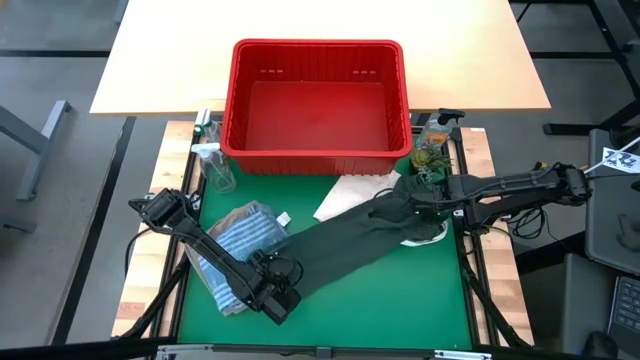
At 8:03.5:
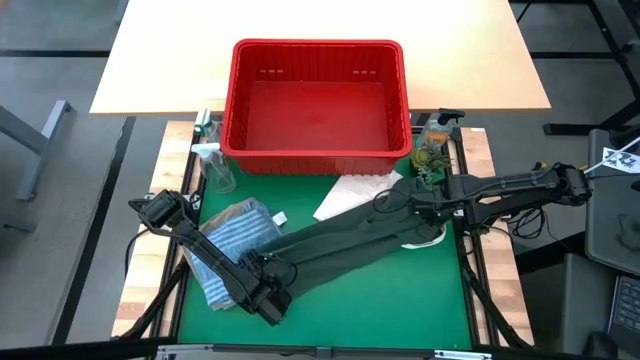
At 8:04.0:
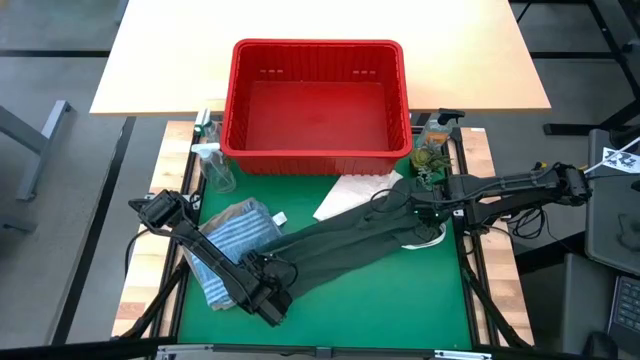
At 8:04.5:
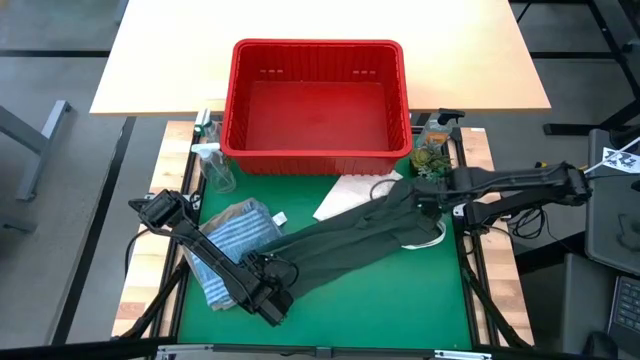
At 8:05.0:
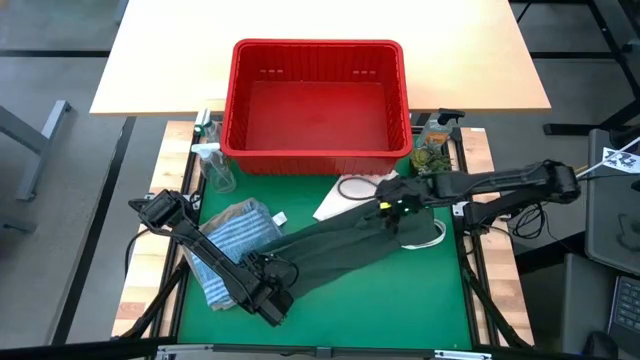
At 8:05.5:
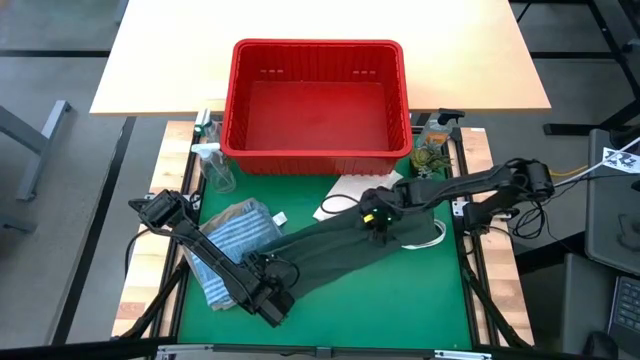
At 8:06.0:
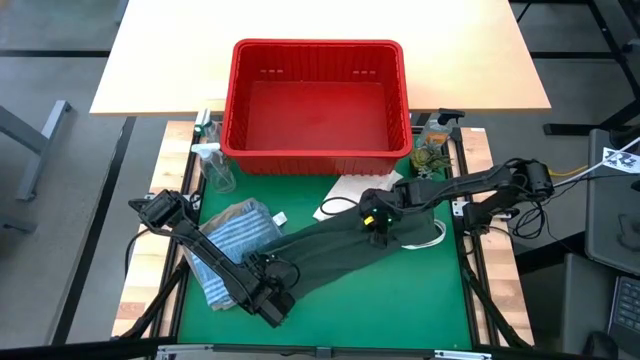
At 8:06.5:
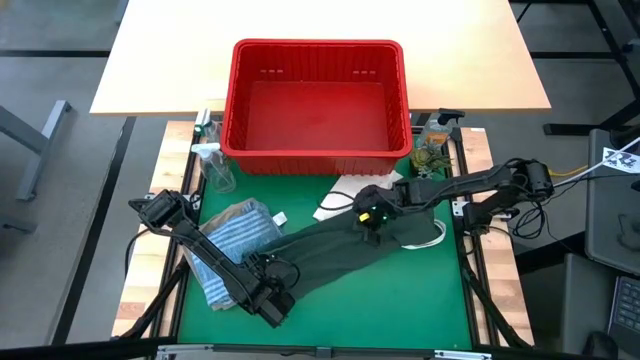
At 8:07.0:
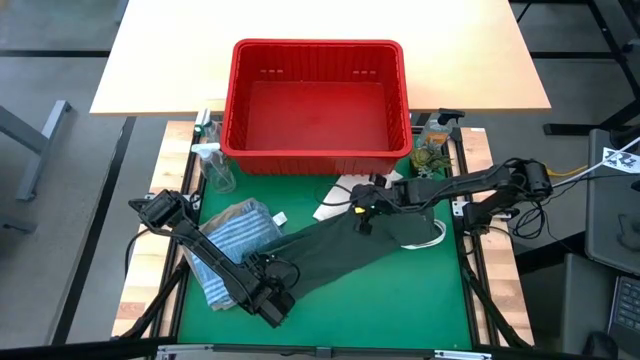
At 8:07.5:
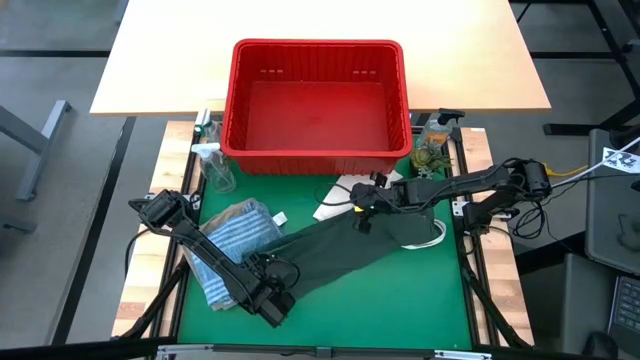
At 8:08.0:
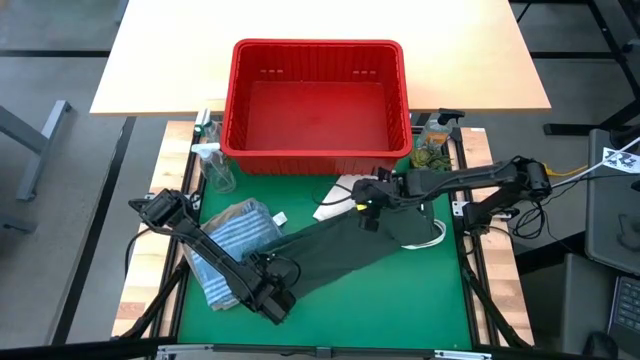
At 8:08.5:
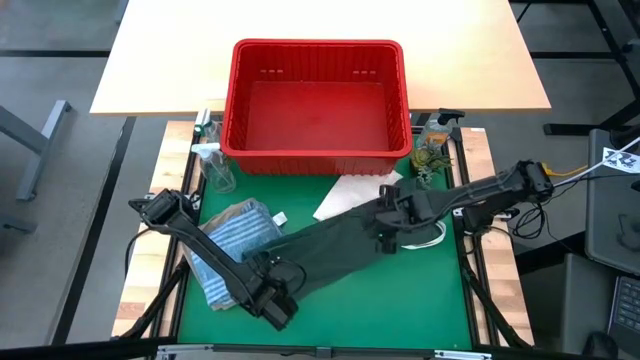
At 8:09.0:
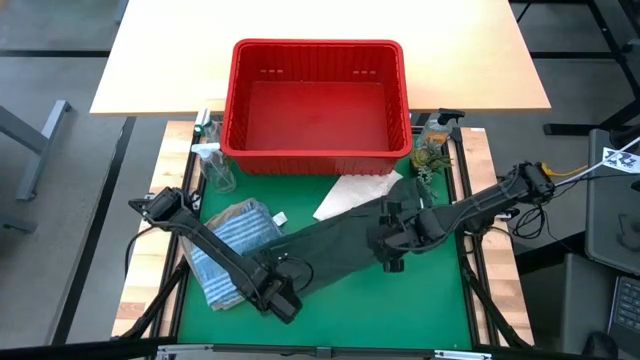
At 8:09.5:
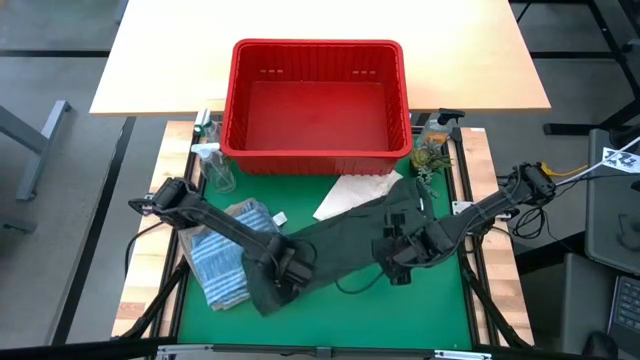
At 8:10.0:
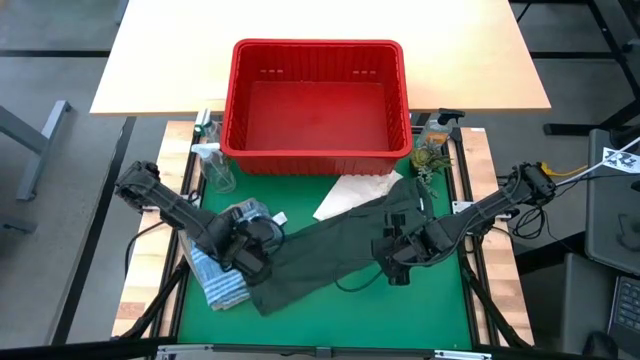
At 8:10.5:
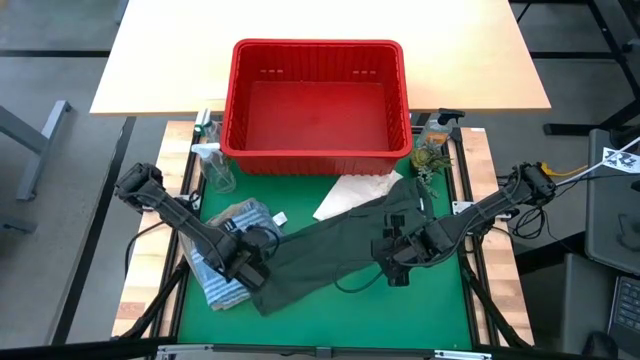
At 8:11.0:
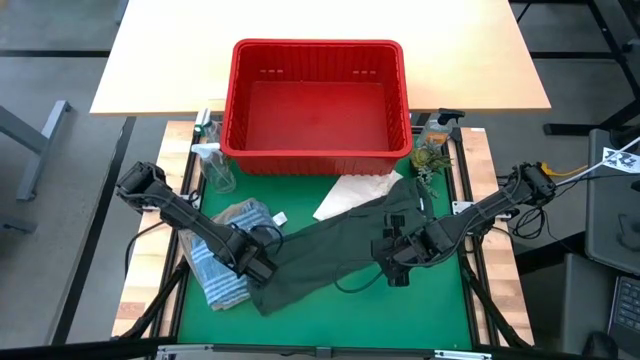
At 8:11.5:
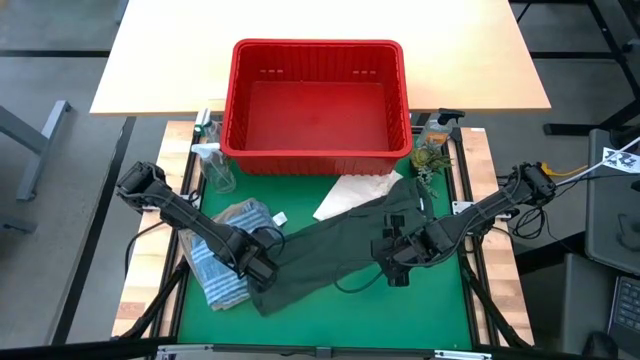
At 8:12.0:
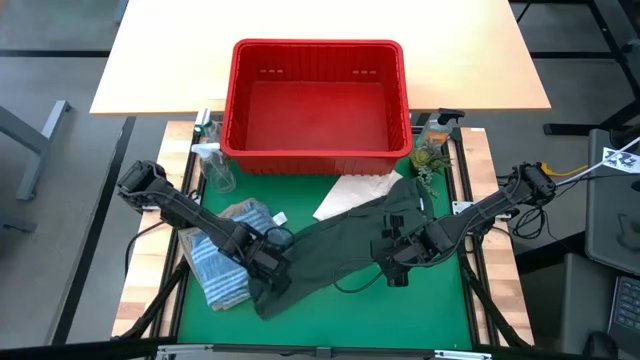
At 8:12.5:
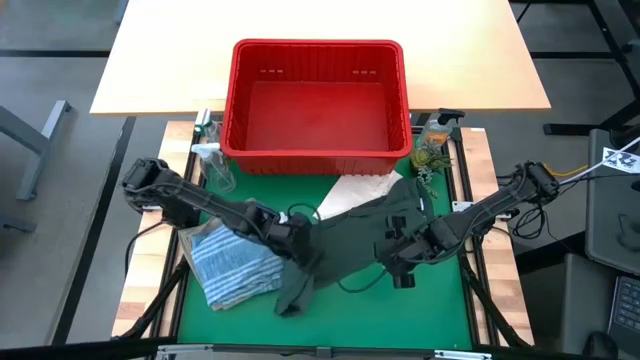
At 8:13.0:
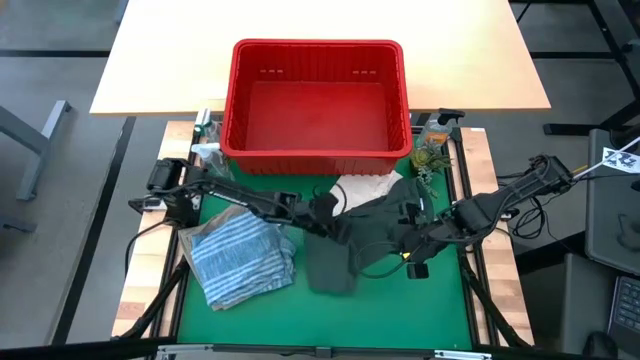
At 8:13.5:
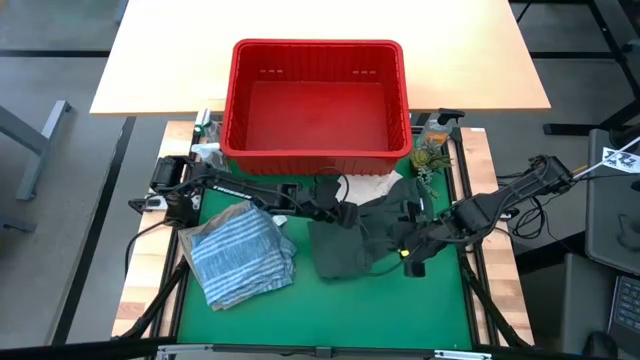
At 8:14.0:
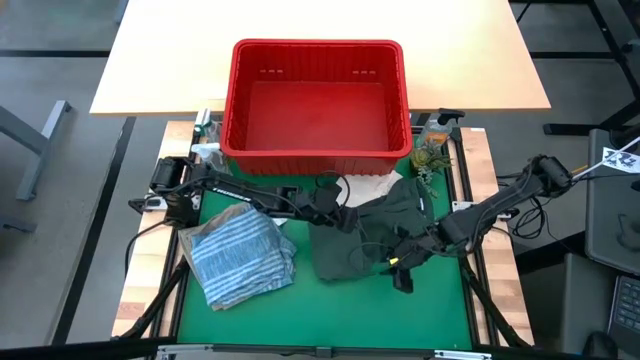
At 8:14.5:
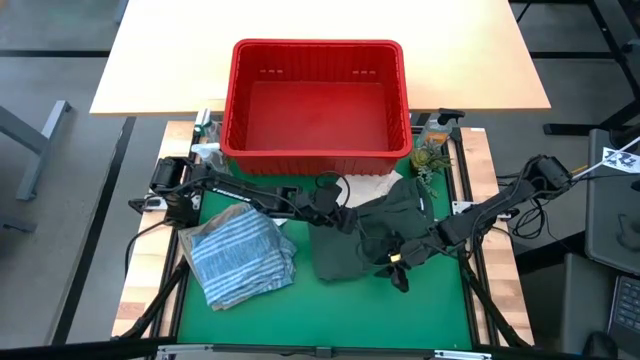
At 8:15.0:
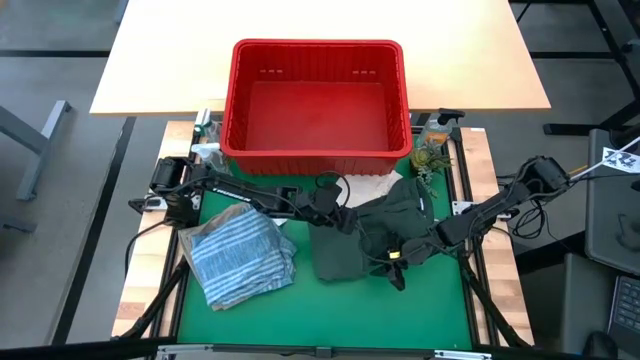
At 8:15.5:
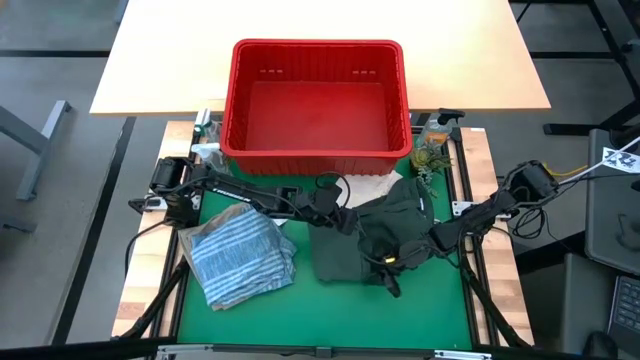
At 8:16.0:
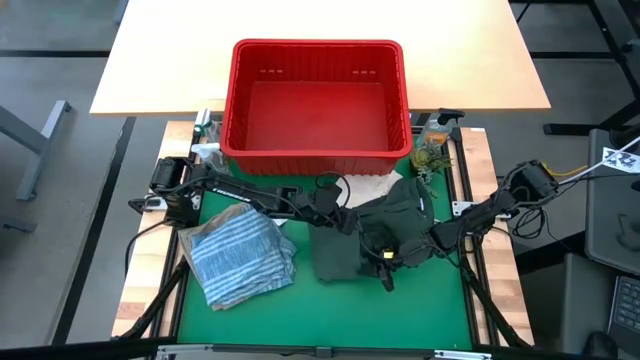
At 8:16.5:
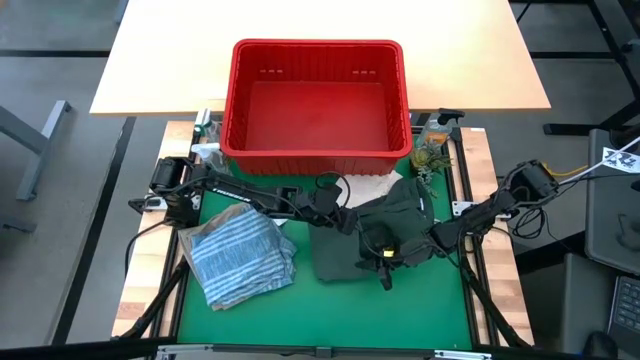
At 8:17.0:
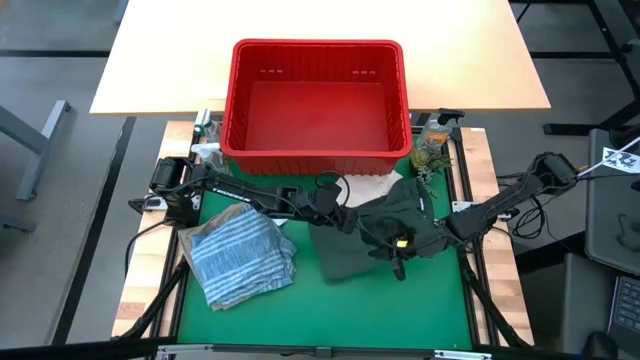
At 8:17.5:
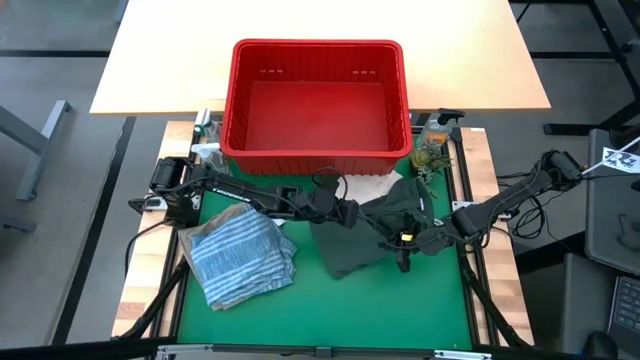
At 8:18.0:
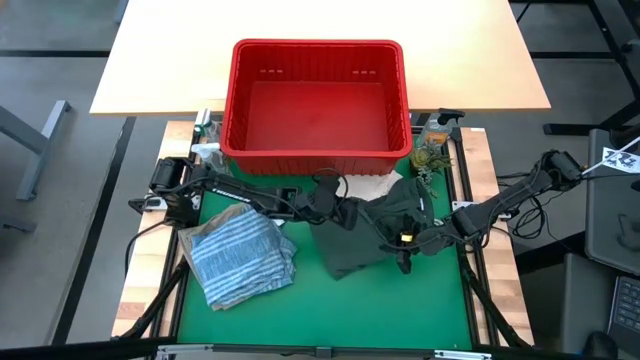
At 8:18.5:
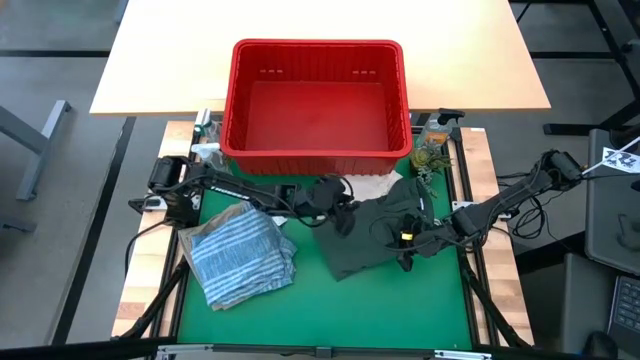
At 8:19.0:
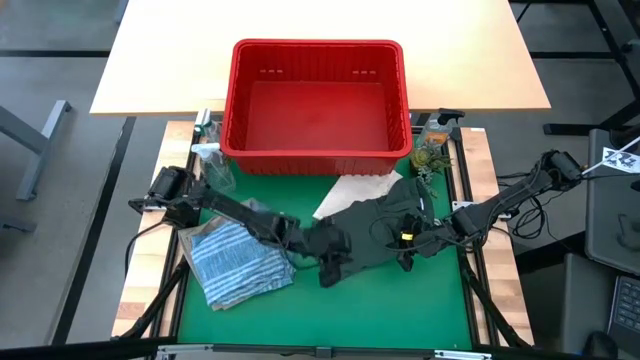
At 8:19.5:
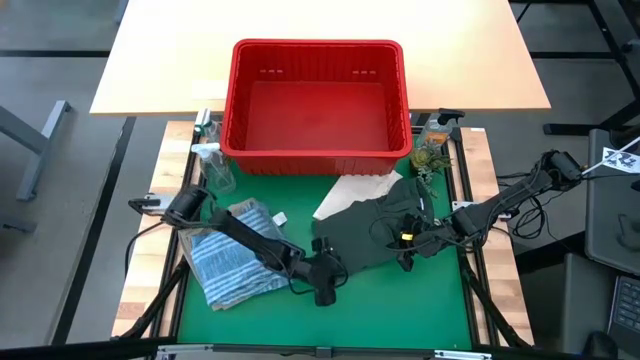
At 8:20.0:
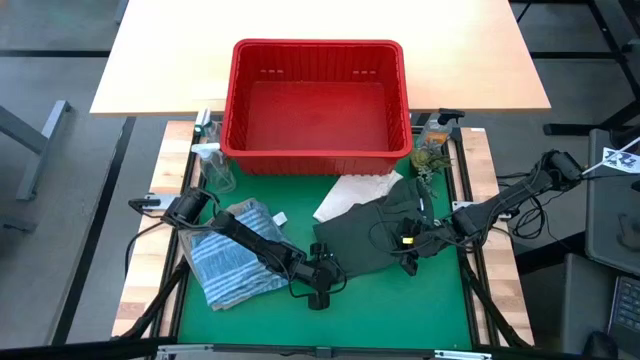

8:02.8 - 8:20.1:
Task: Fold Laundry from Bin
Fold the green polo shirt
